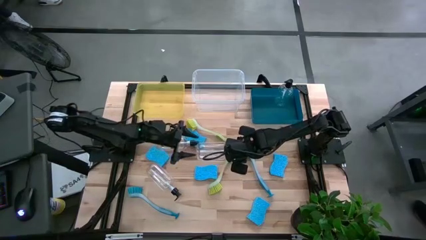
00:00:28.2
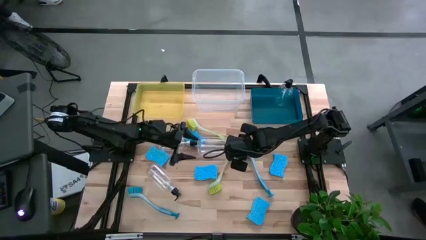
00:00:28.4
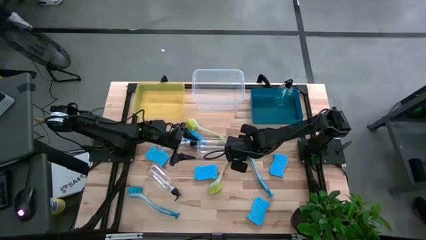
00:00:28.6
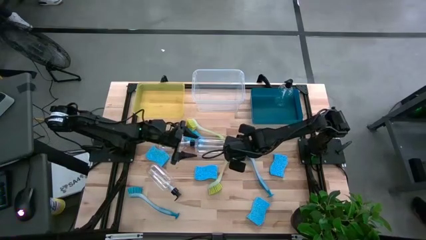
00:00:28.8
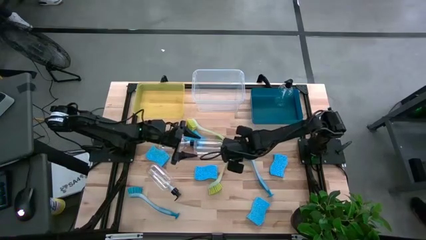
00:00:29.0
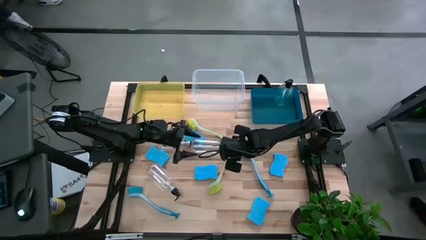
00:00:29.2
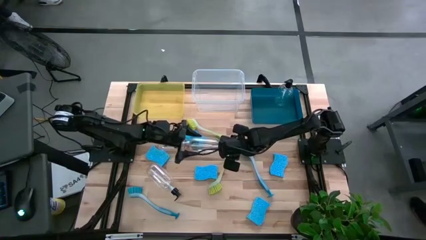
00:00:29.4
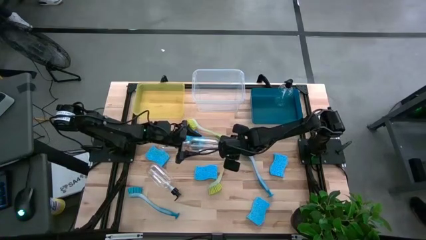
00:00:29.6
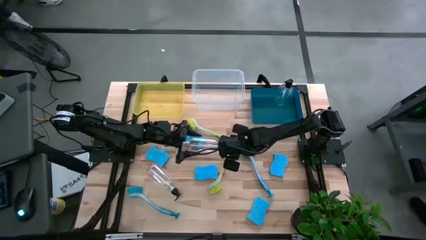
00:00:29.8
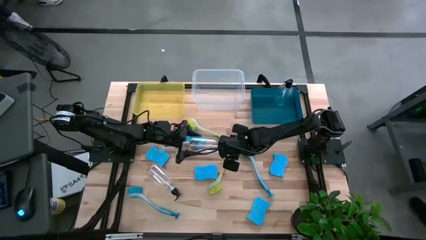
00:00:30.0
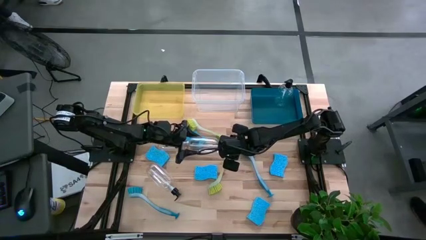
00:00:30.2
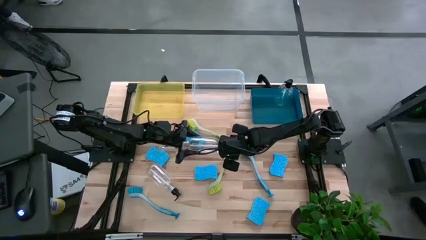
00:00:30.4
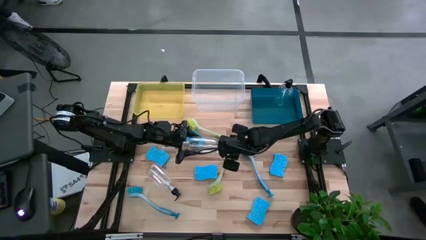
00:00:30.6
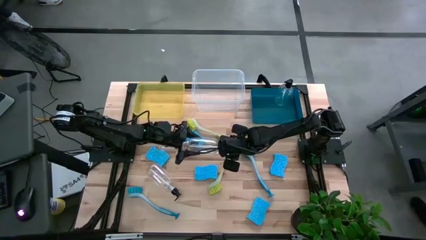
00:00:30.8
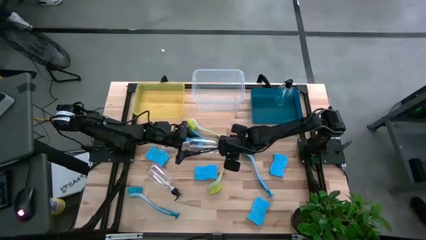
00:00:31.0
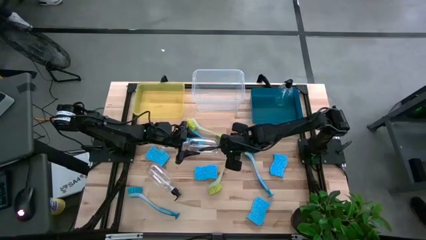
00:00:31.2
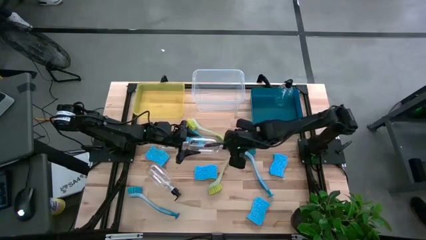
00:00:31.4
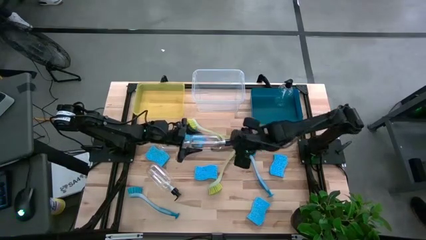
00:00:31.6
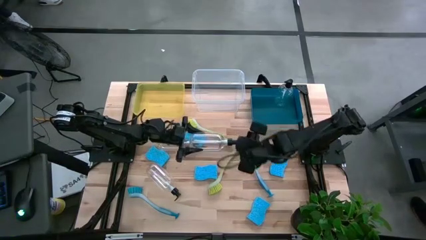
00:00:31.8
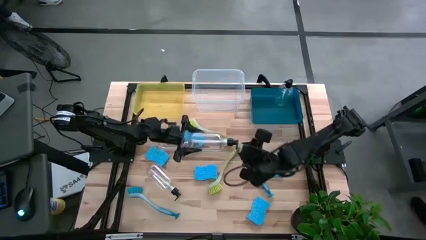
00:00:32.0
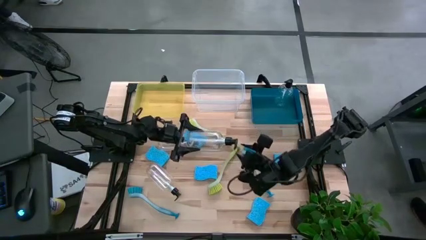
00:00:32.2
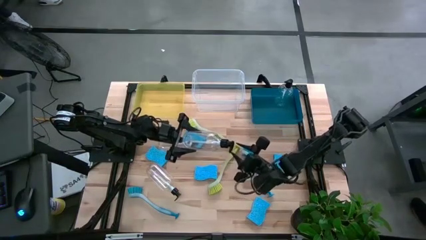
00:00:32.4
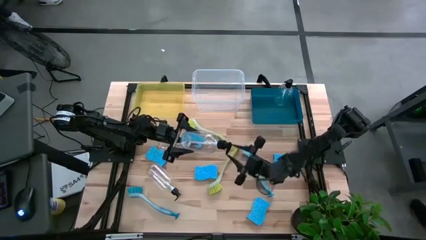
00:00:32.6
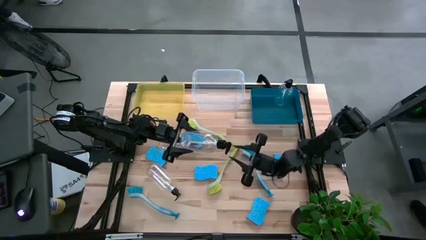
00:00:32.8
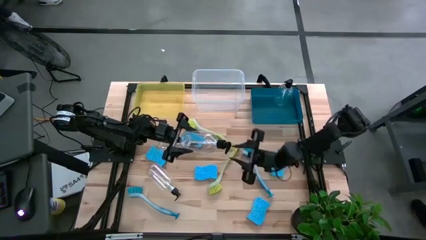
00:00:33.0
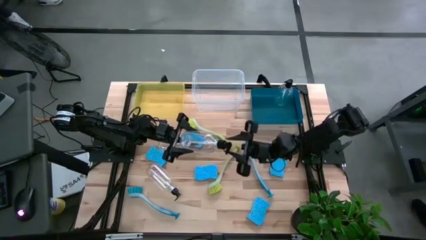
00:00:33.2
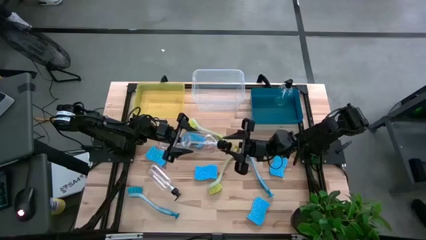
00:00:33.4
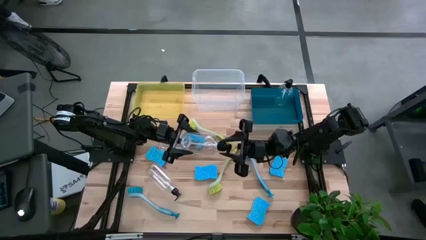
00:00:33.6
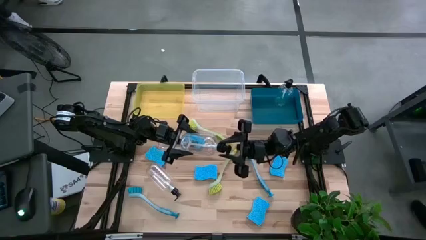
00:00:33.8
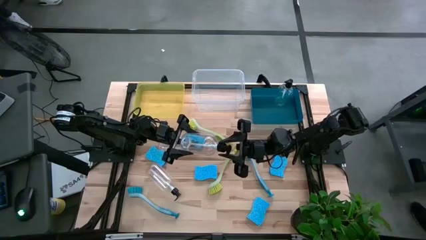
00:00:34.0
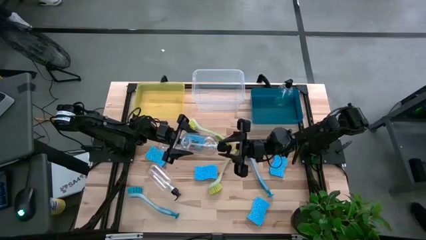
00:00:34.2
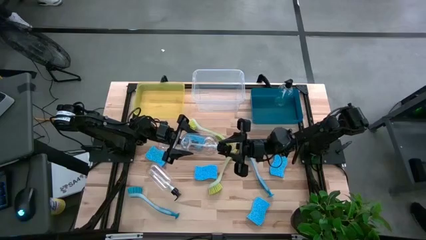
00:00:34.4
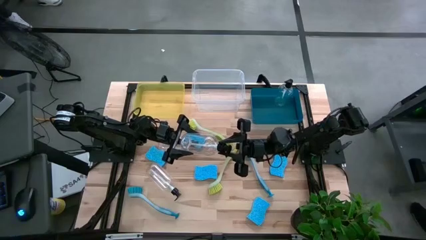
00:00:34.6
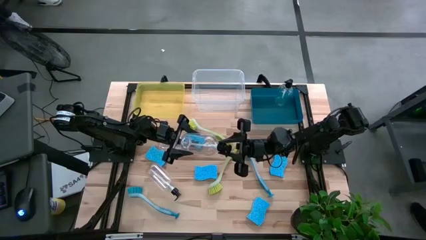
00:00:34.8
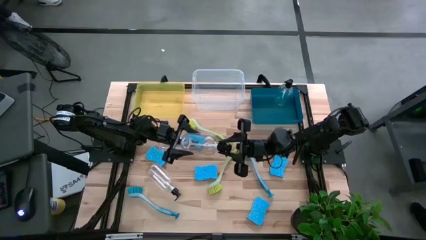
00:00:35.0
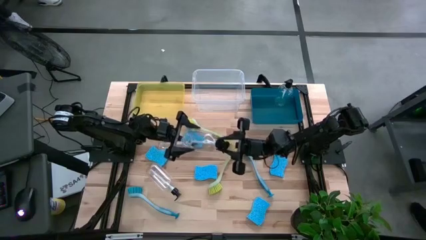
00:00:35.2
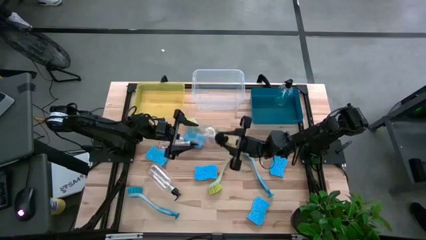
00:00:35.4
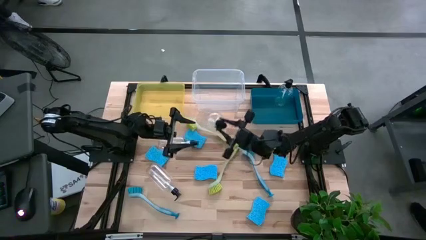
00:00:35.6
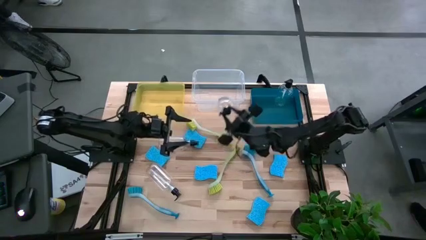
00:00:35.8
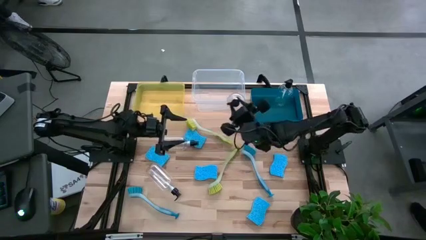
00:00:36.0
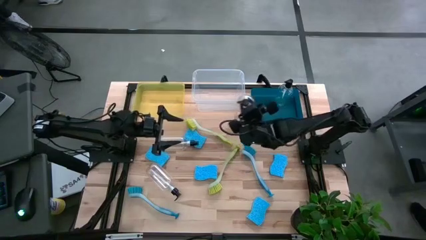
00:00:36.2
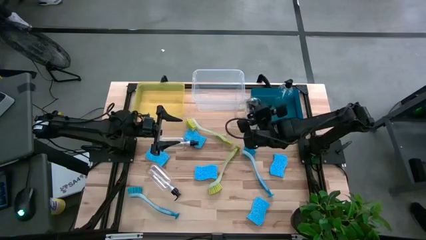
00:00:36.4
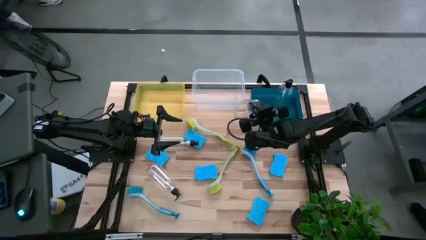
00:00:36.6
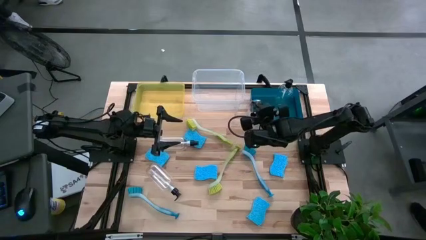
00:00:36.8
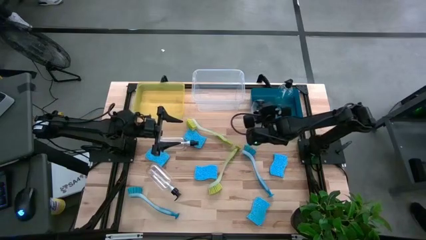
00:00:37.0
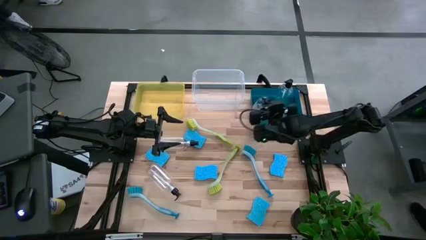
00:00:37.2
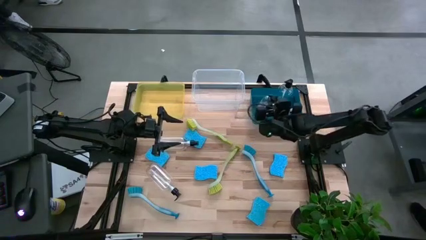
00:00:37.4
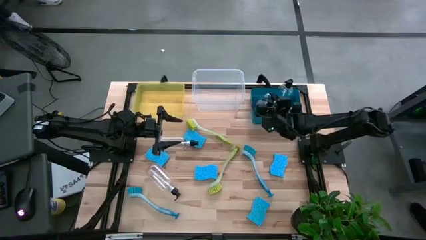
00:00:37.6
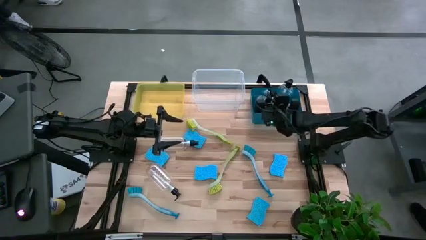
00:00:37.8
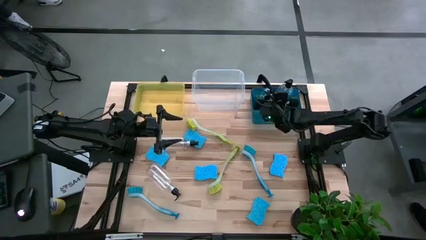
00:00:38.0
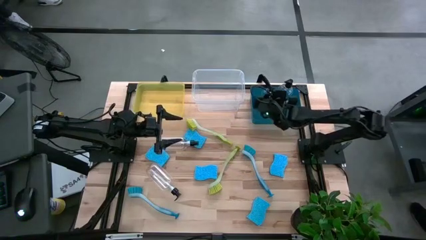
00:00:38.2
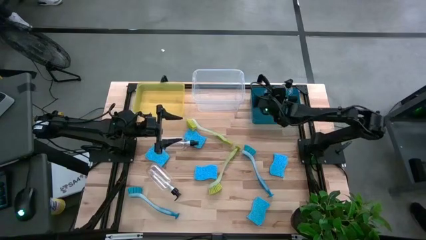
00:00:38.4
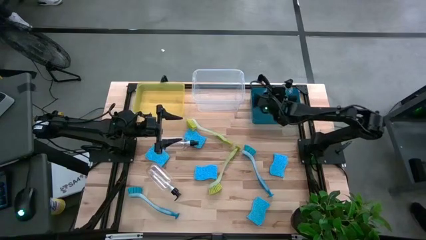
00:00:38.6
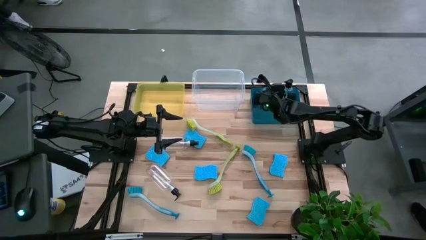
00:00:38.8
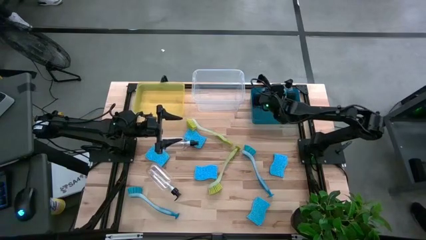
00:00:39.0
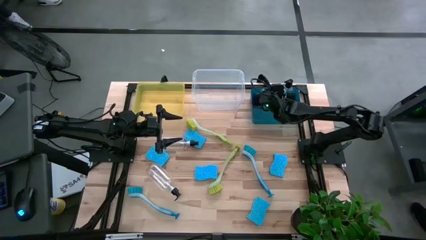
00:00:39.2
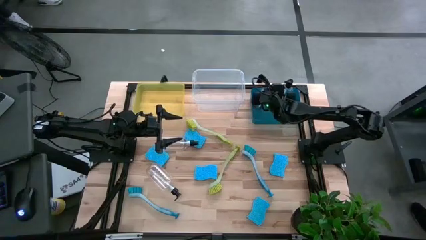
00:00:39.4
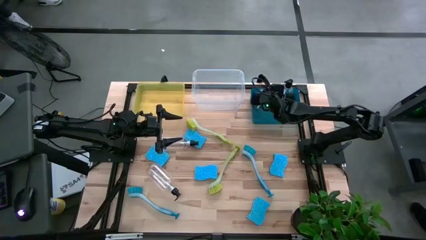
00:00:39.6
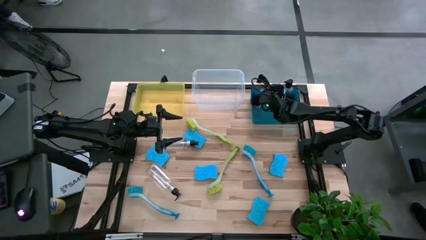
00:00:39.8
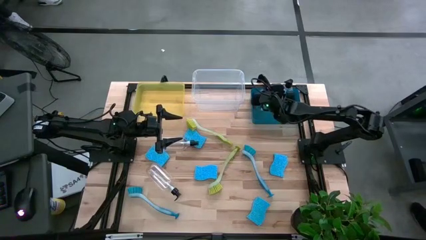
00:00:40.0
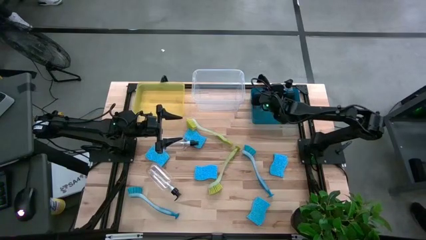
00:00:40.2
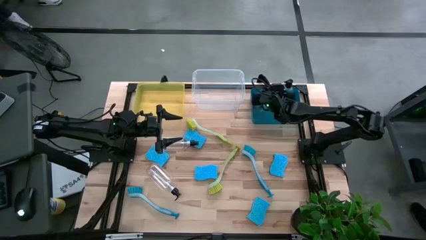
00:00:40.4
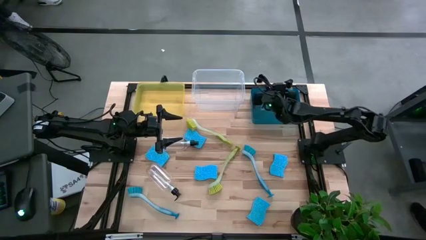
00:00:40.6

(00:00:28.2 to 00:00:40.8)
Task: Pick & Place Kitchen Sink Supplies
Put the transparent spray bottle into the blue bin

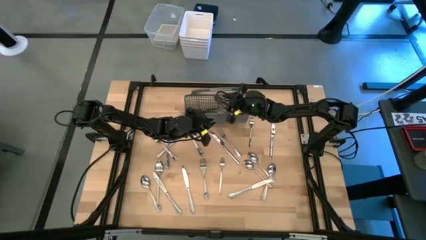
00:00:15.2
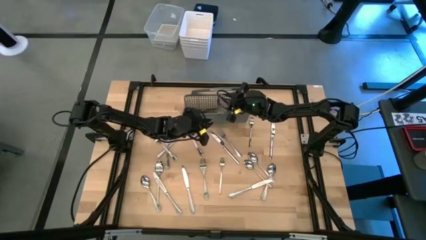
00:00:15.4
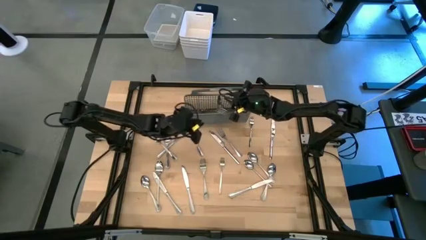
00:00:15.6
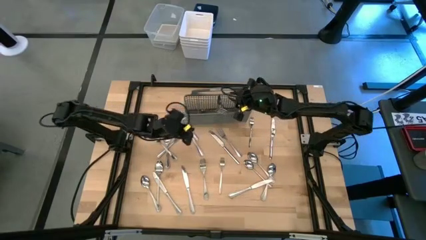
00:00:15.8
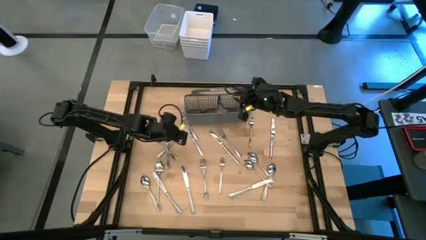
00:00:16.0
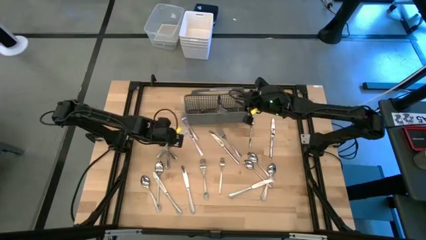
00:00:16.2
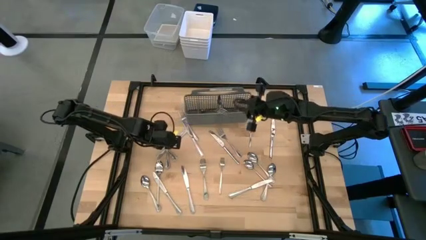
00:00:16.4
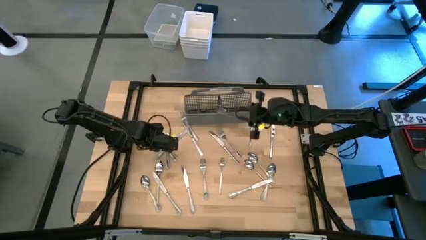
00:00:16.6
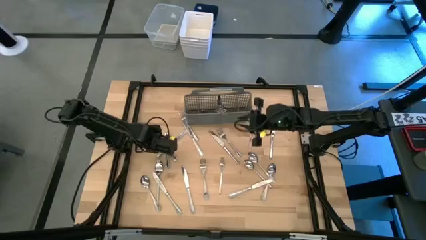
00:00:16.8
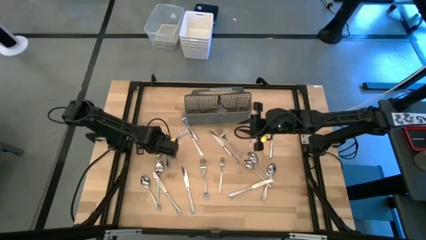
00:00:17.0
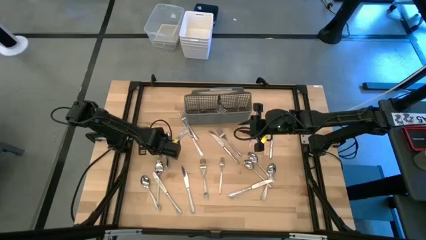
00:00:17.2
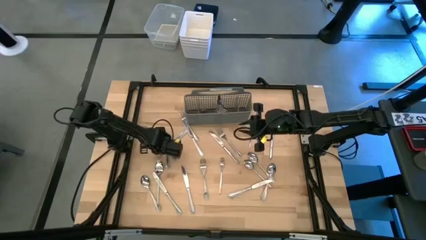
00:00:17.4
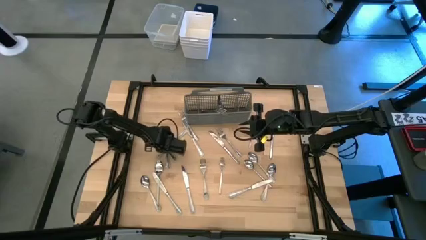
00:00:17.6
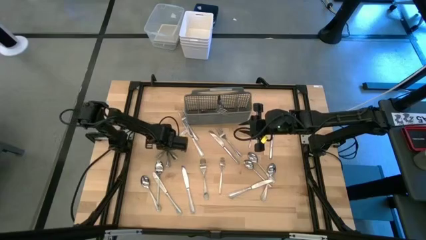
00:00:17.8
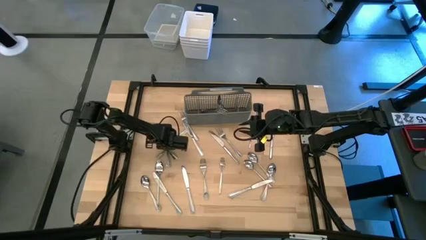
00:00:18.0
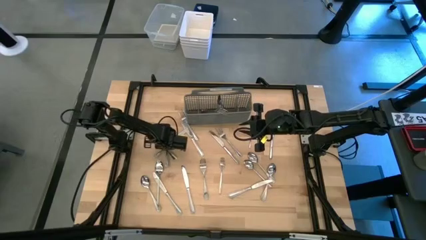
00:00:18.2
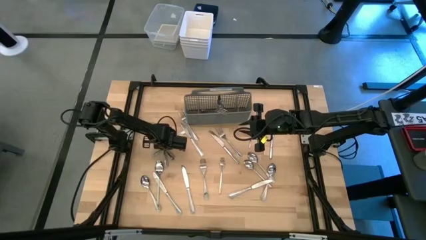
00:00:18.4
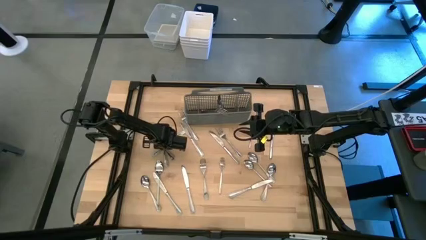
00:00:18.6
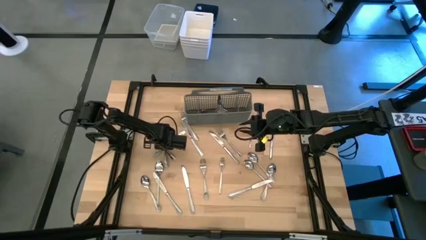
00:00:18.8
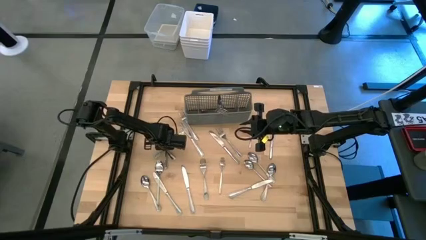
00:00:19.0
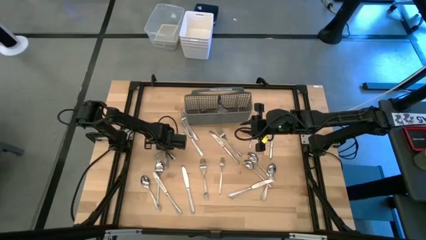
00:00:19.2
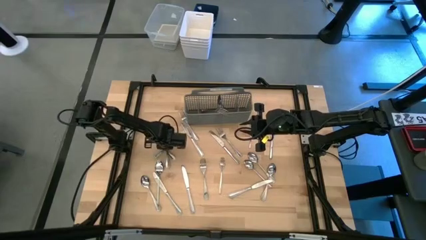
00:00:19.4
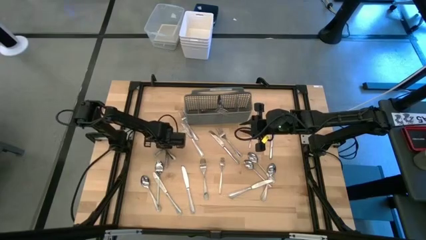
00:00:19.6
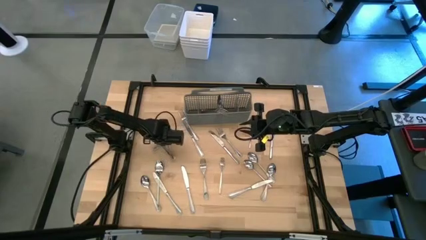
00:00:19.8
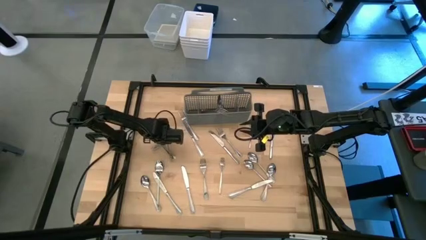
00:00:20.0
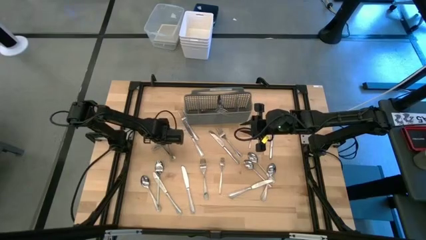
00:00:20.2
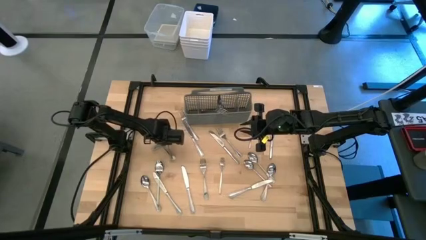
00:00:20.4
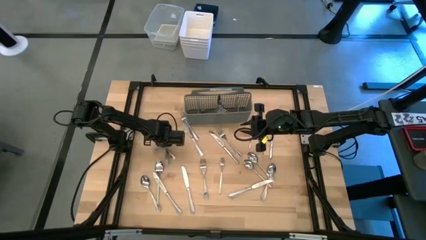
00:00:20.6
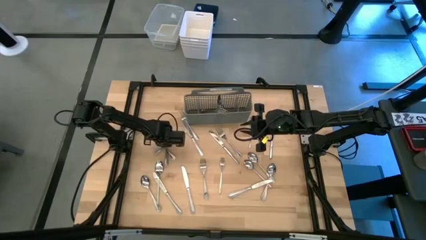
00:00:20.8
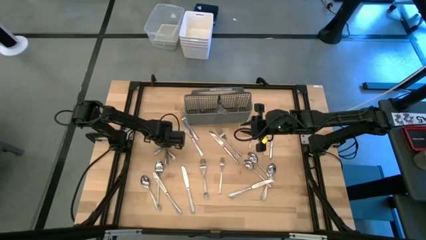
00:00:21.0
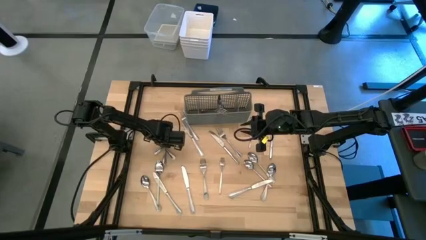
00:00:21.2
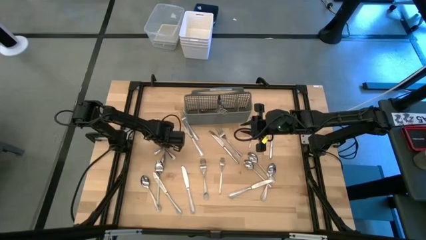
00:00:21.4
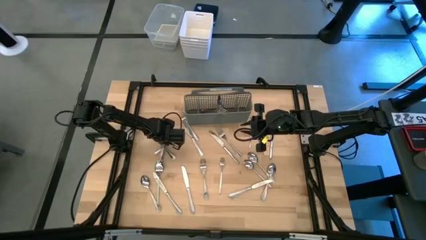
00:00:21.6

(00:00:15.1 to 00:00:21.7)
Task: Sort silverware
Put the silver spoon into the gray silverware organizer
